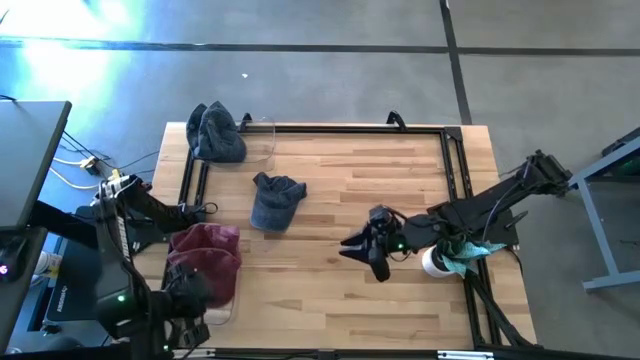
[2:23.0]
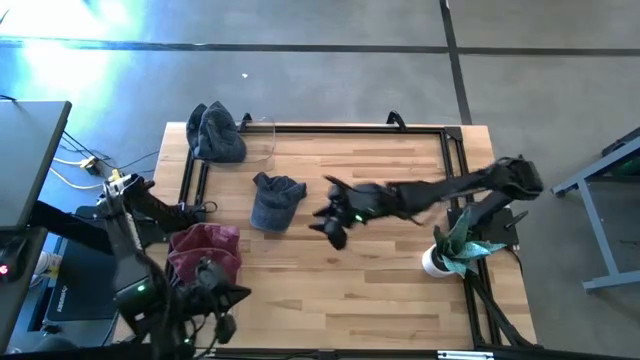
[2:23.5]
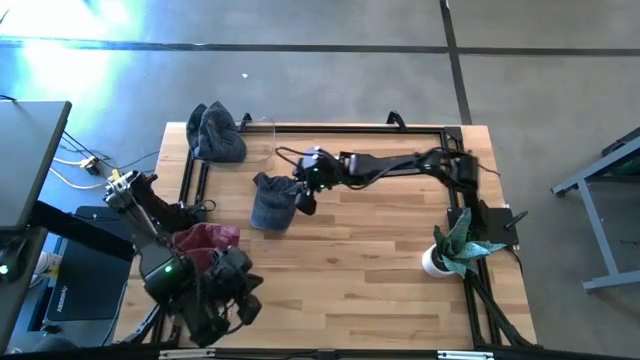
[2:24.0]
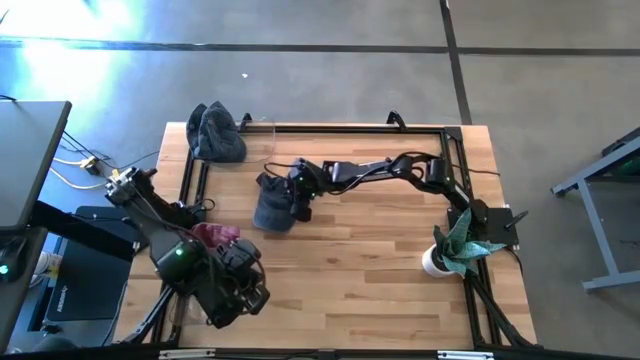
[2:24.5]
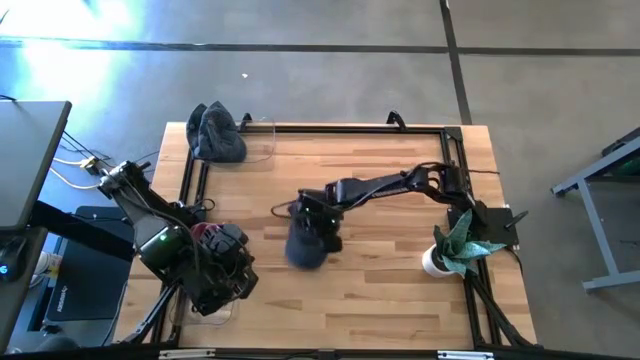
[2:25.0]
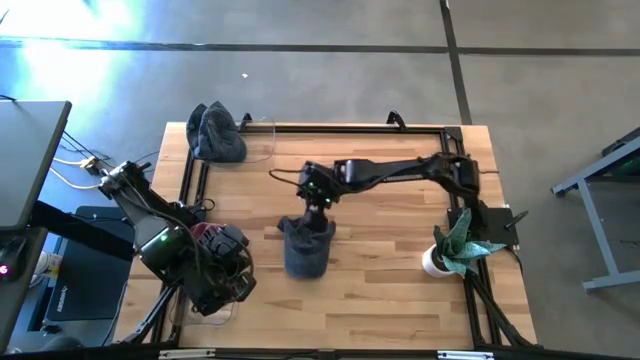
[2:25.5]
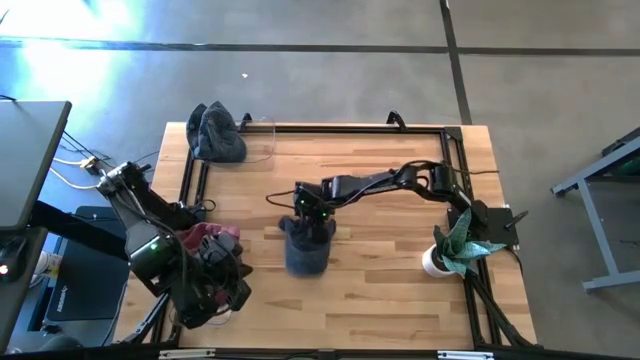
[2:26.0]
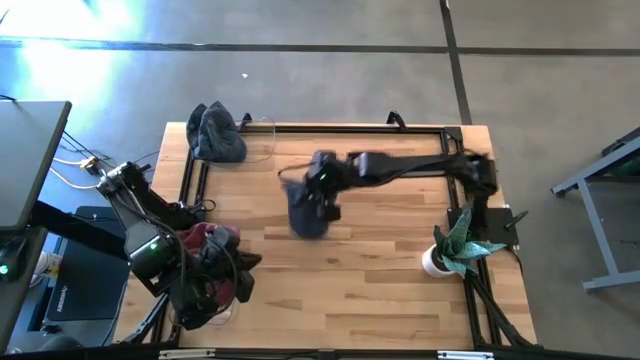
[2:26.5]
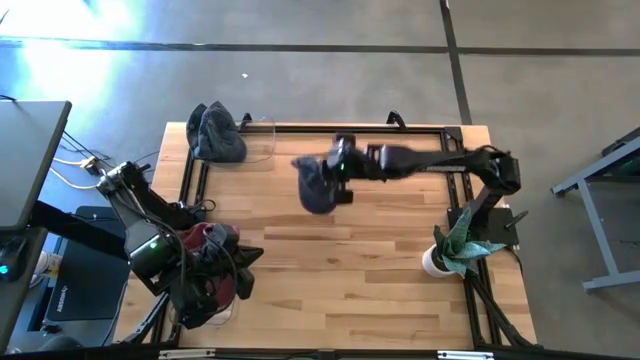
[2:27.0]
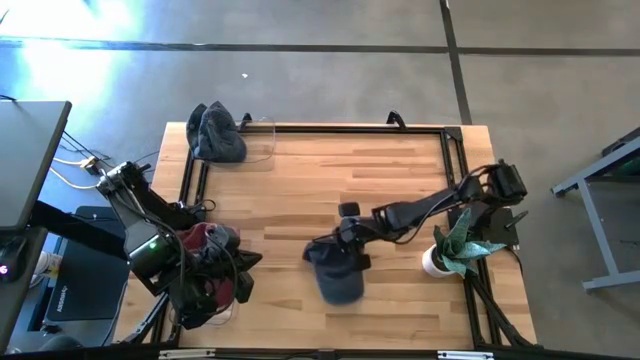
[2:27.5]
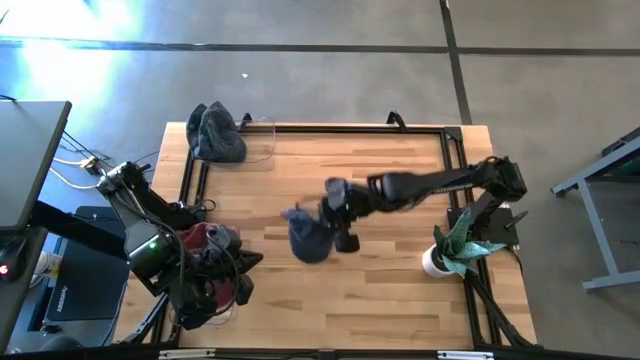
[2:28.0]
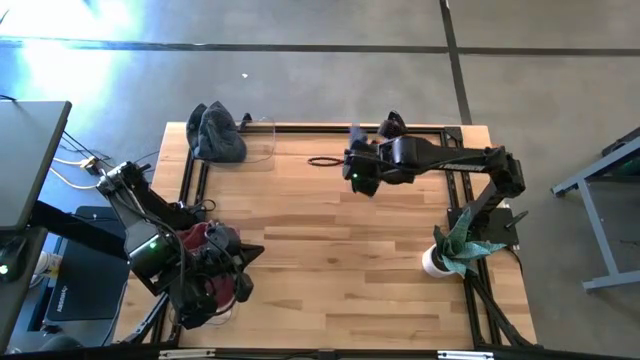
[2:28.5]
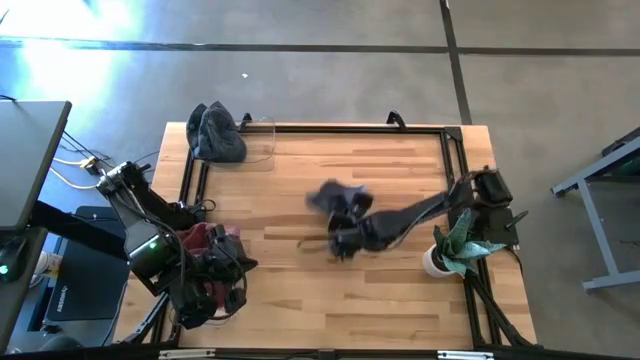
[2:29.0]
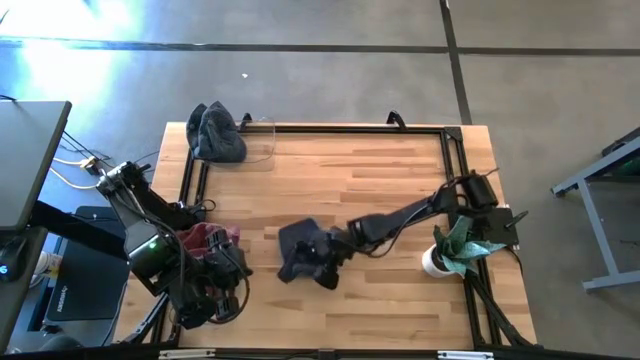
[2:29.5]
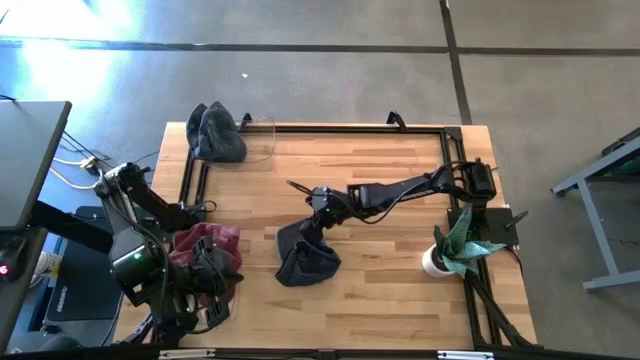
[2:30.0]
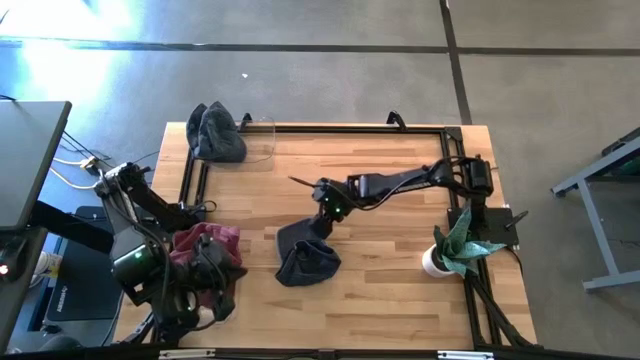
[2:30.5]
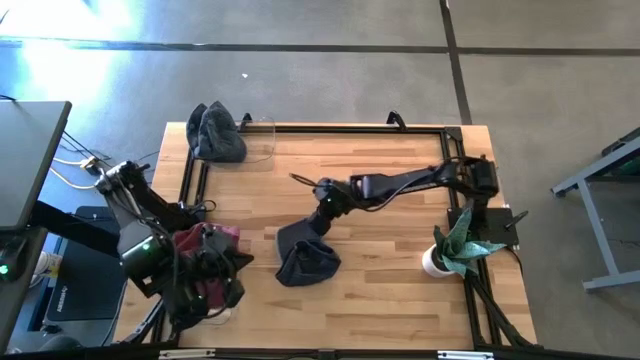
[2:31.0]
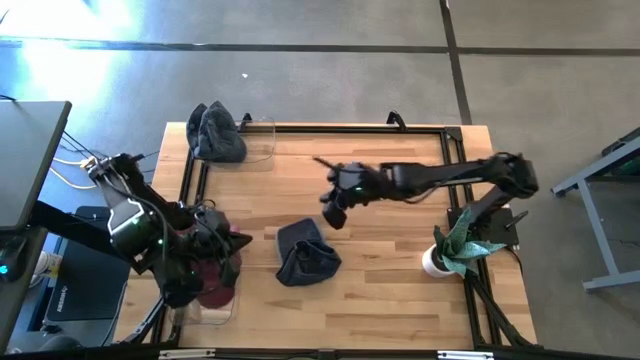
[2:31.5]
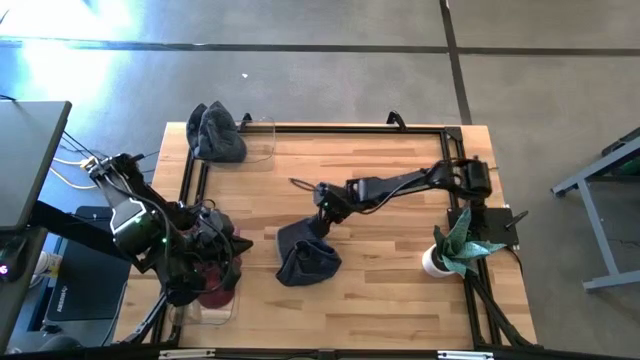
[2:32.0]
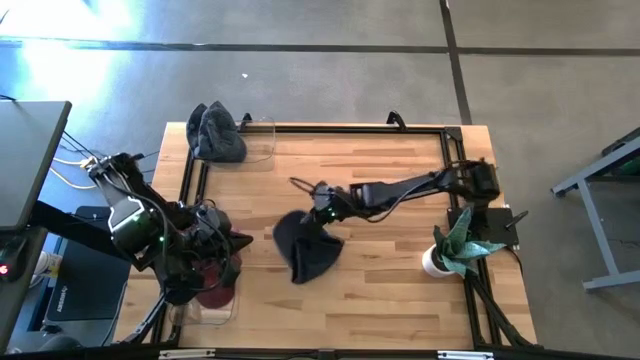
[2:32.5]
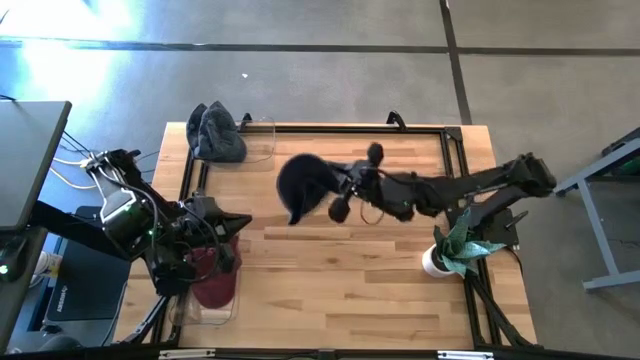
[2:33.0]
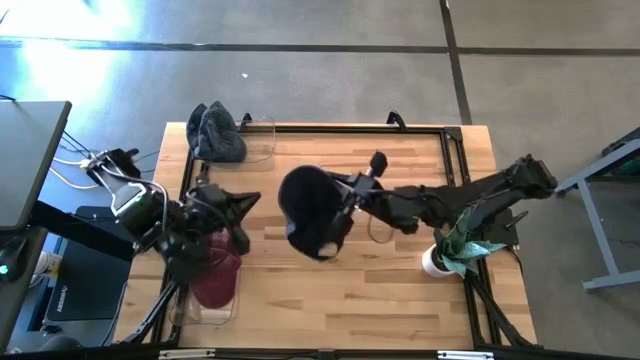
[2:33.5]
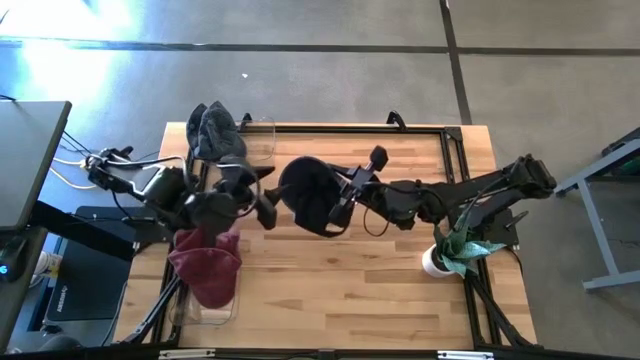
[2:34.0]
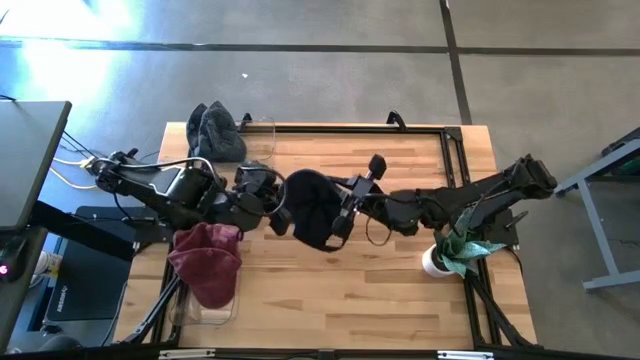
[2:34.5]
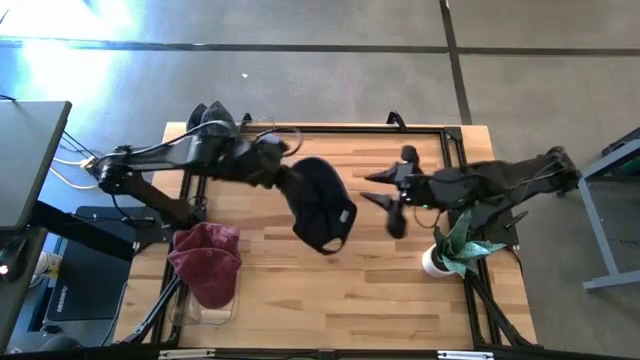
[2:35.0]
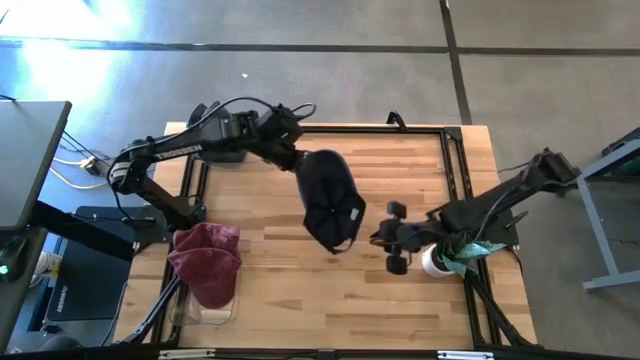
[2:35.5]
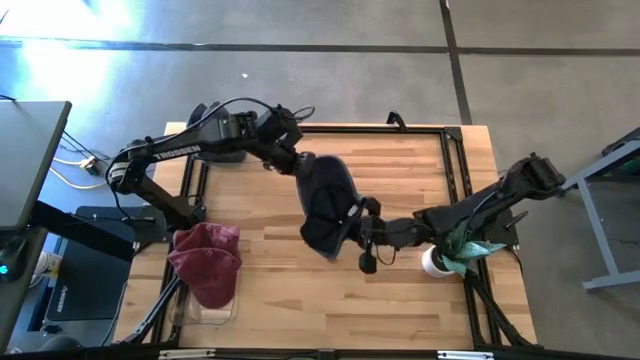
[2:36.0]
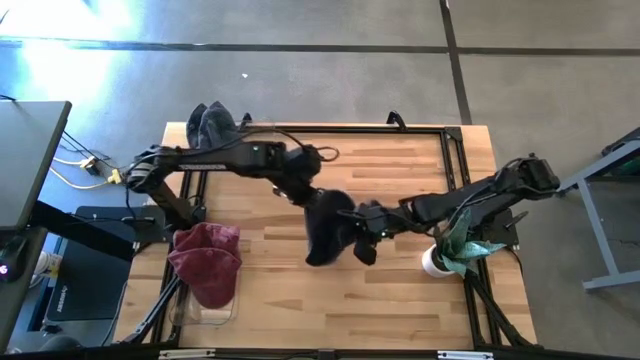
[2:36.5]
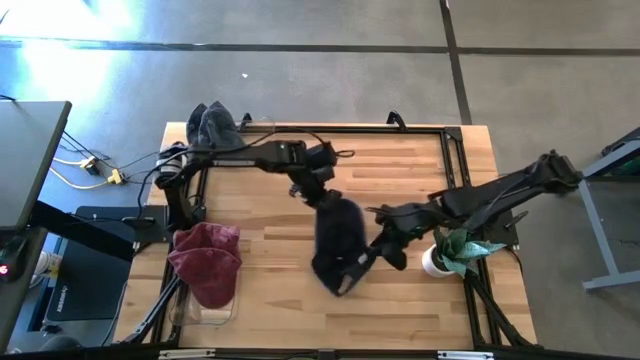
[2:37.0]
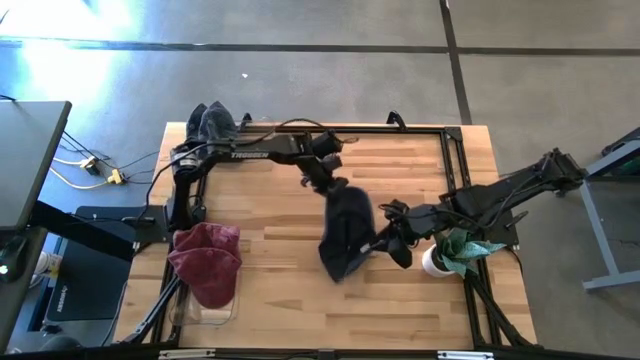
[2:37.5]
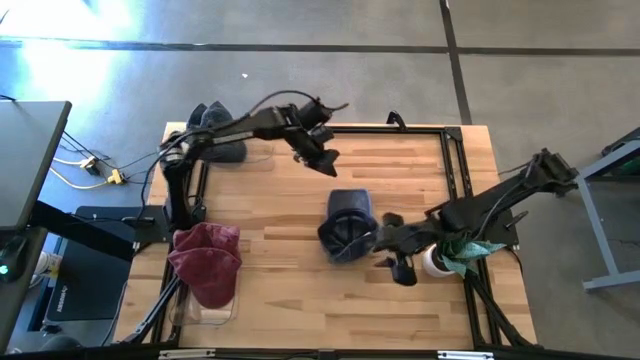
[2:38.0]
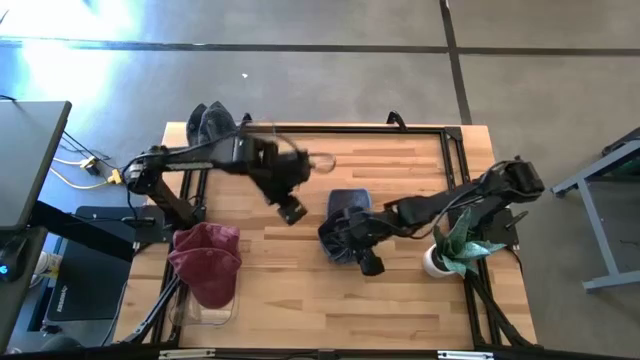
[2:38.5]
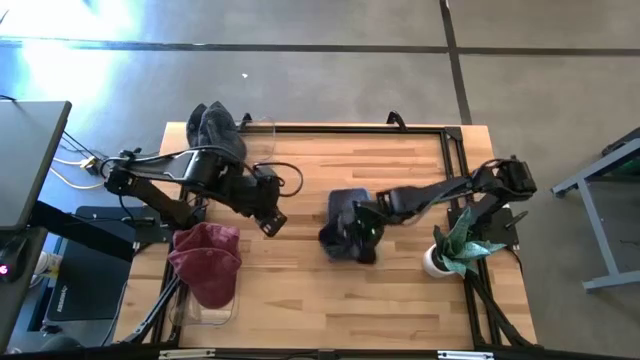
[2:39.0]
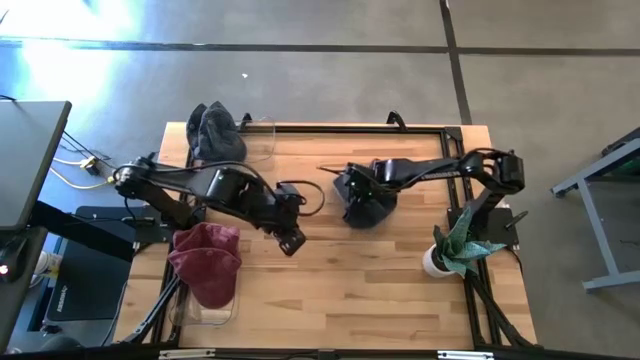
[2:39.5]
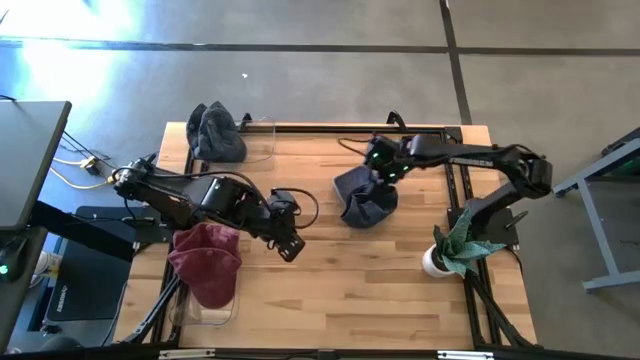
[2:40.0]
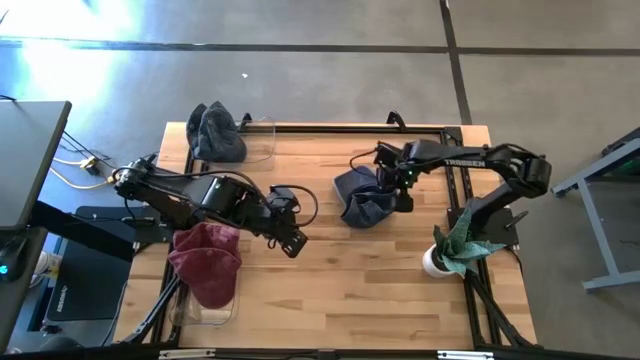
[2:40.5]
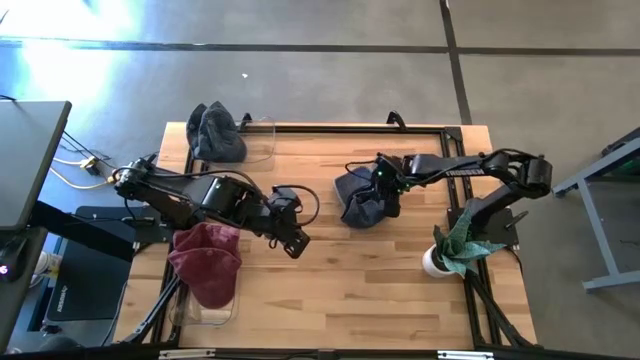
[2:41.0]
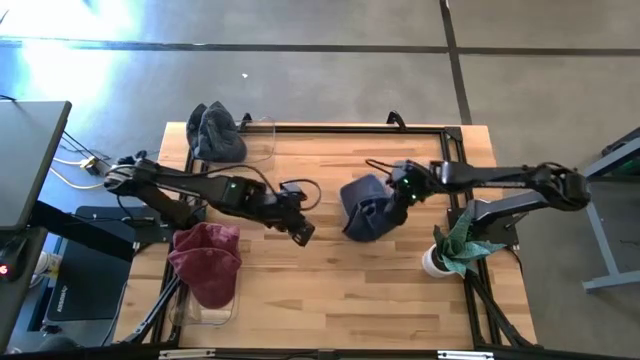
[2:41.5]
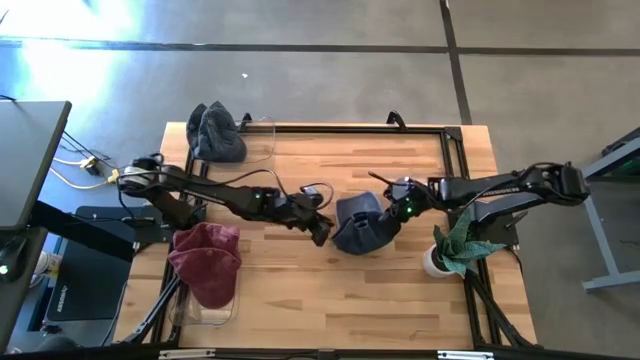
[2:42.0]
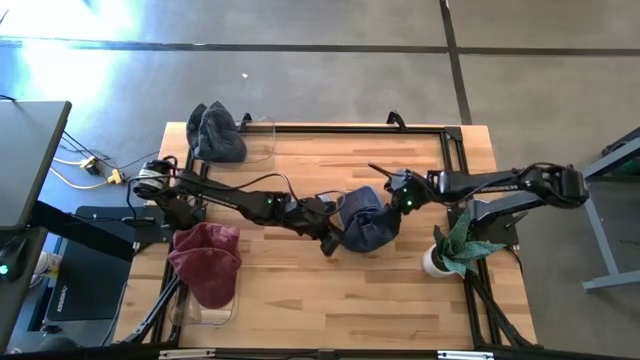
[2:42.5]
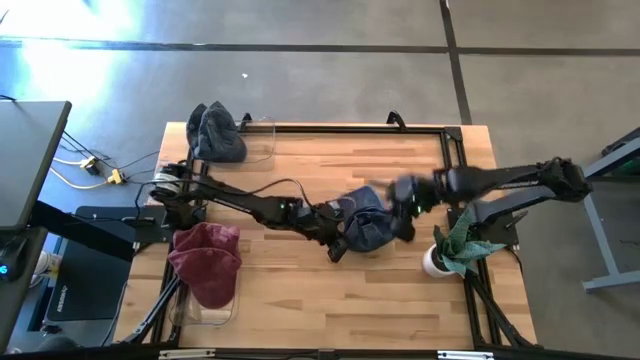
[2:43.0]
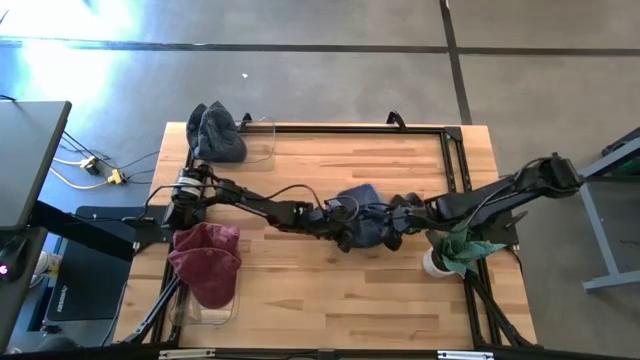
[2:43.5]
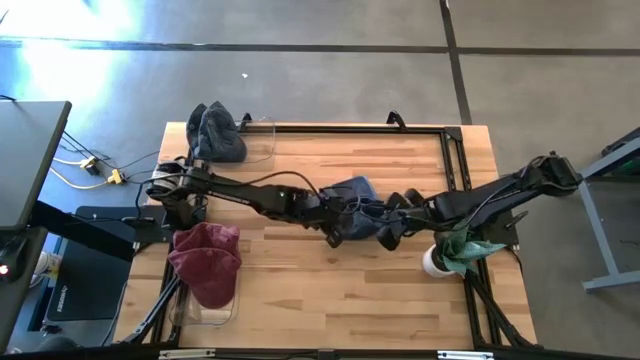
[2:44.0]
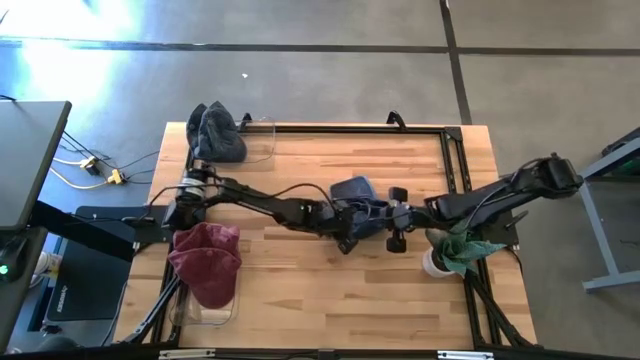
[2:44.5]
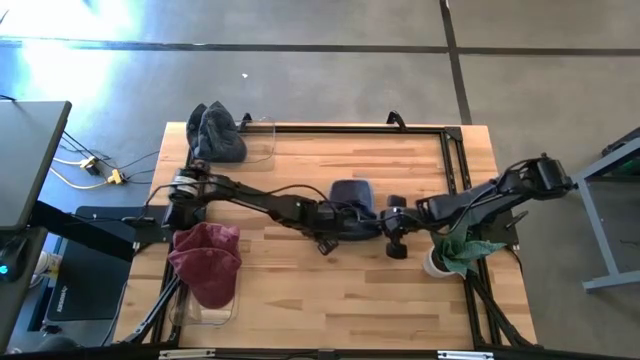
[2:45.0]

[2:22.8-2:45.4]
Task: Pick & Place hat
Put the blue cap into the top transparent bin
